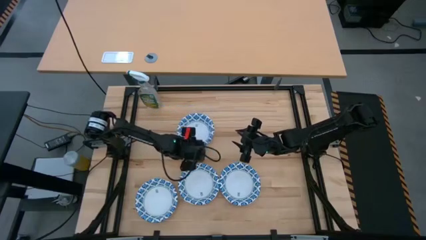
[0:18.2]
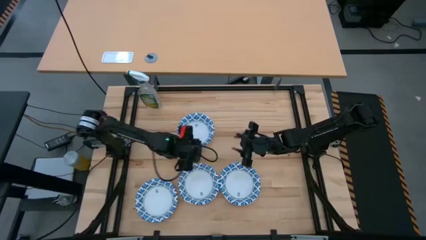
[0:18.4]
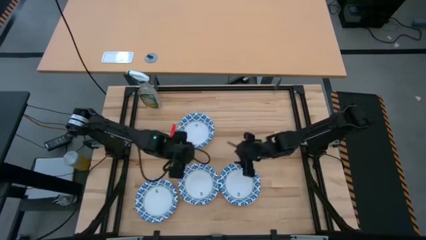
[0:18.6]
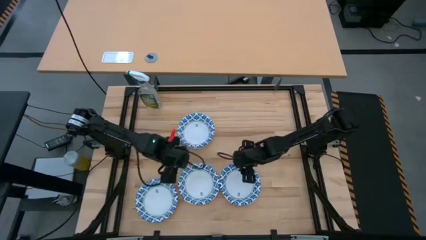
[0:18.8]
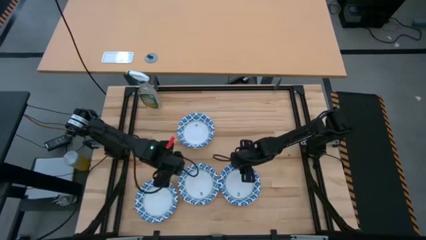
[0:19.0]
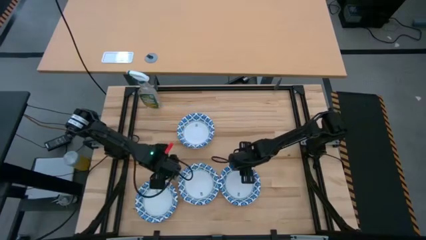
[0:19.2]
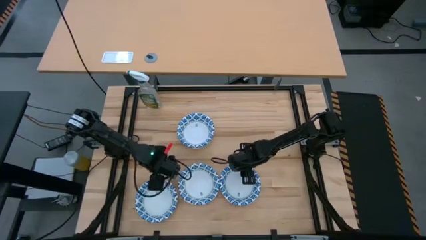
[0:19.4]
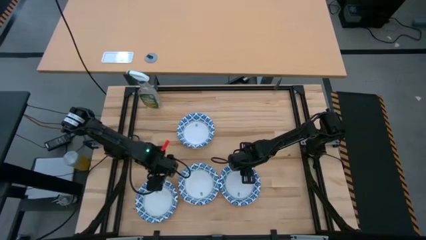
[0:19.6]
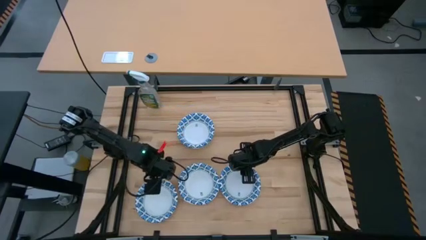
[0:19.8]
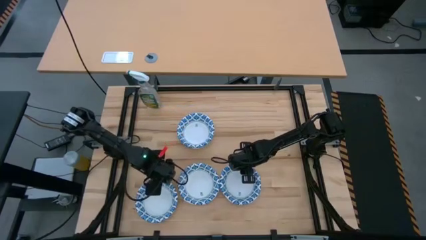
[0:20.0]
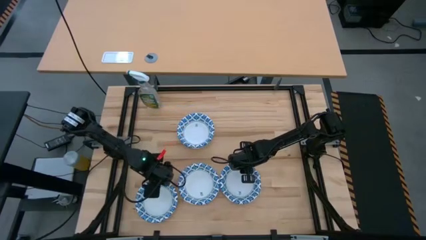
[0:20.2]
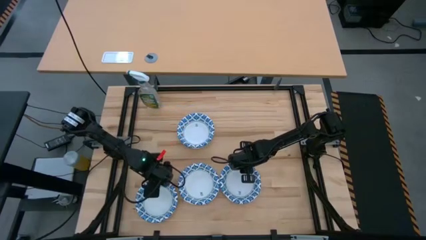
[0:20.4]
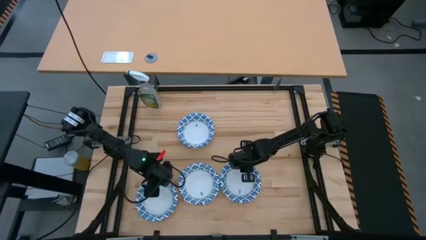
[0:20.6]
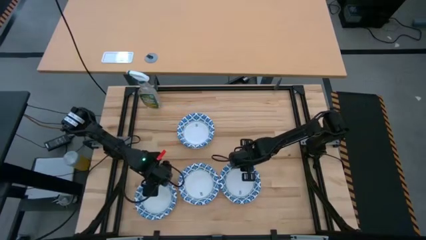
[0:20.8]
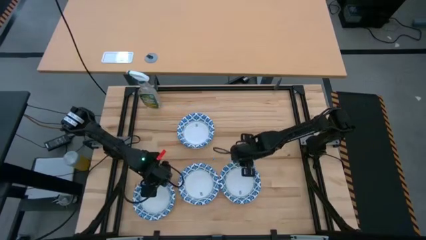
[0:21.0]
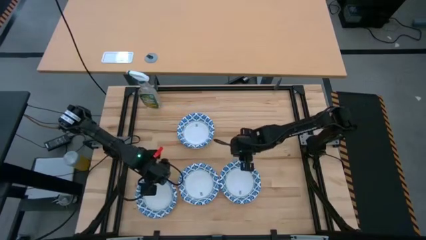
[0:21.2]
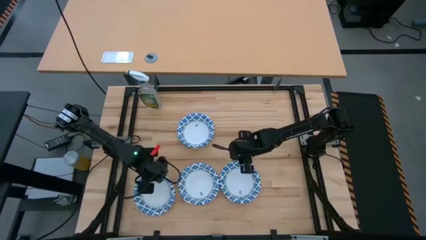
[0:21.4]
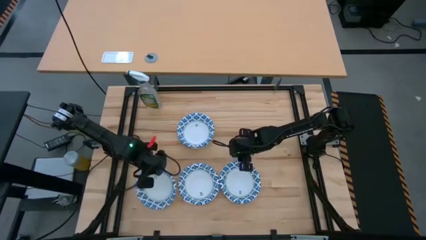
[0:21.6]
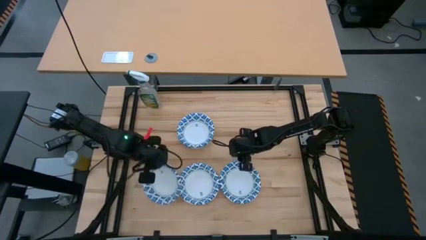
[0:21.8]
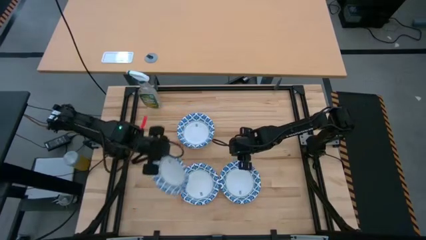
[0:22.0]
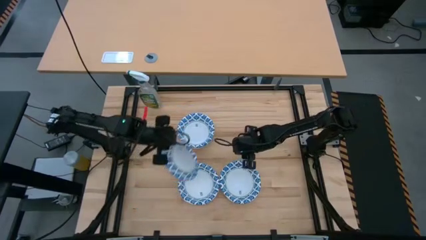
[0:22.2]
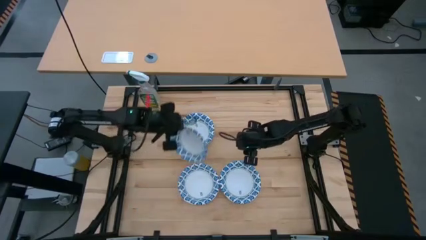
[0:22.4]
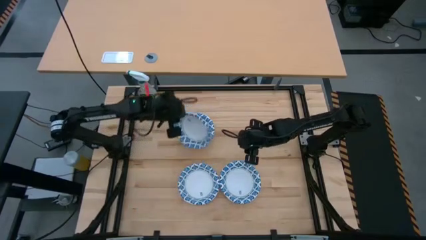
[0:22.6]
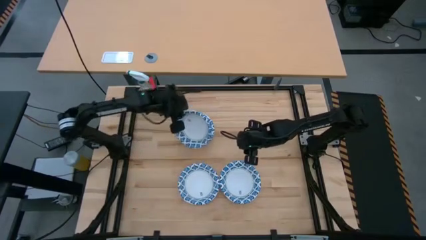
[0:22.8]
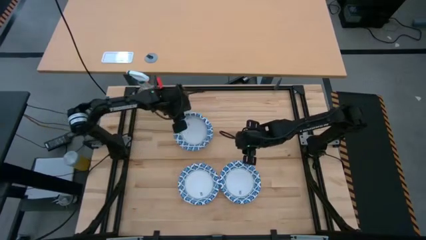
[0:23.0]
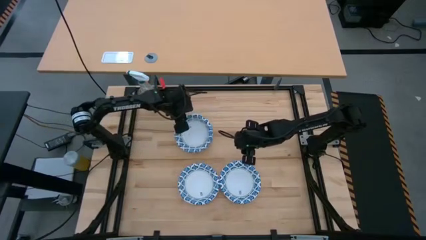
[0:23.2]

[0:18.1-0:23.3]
Stack the white bowl on top of the stacked white bowls

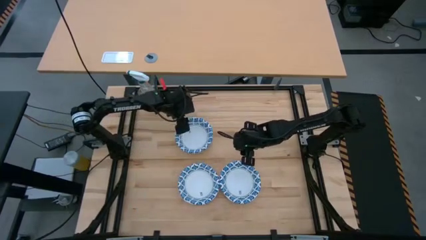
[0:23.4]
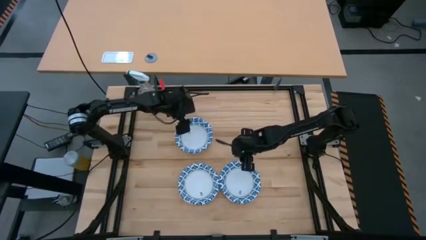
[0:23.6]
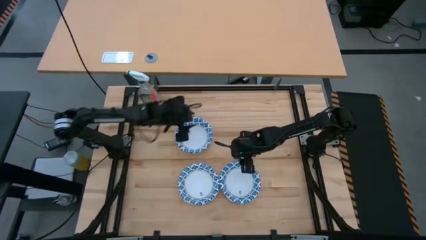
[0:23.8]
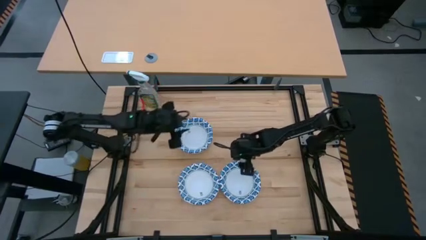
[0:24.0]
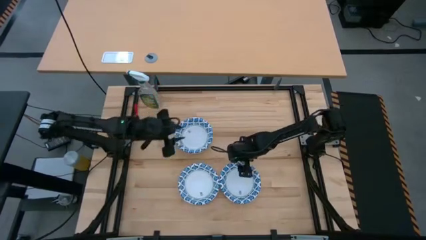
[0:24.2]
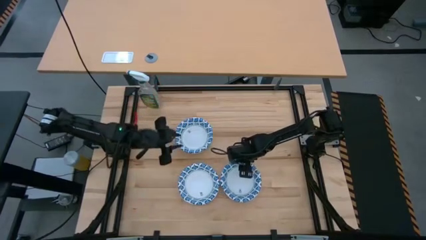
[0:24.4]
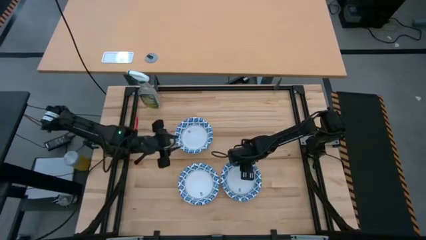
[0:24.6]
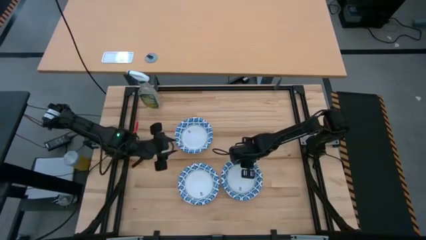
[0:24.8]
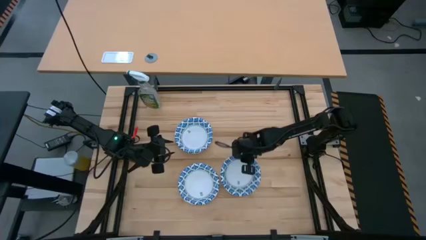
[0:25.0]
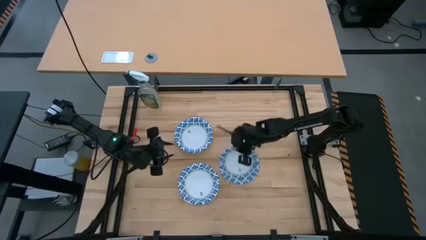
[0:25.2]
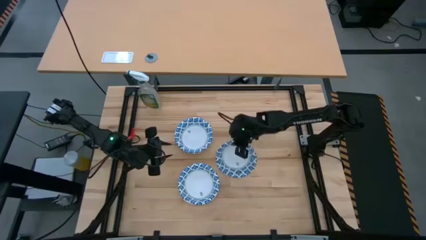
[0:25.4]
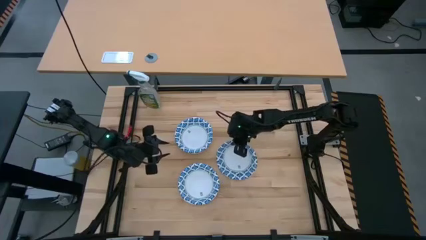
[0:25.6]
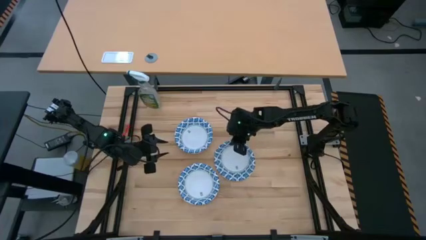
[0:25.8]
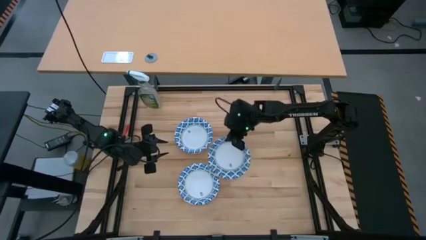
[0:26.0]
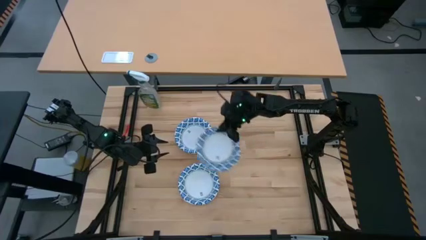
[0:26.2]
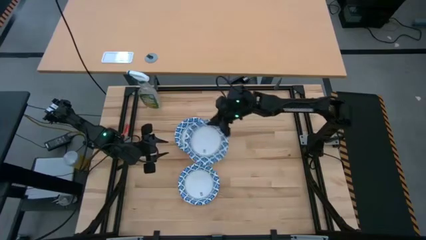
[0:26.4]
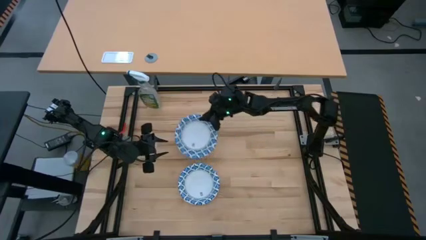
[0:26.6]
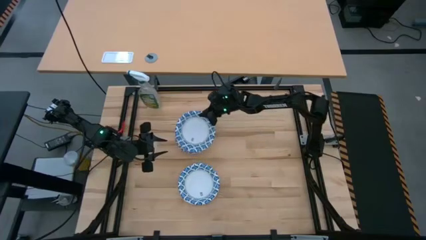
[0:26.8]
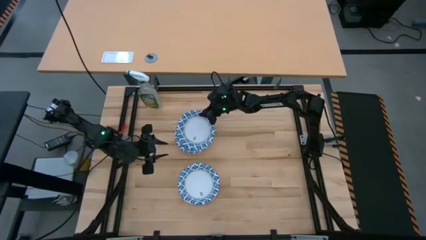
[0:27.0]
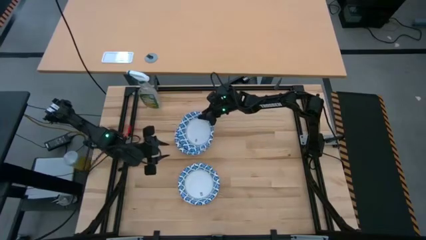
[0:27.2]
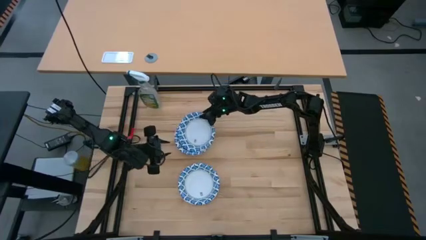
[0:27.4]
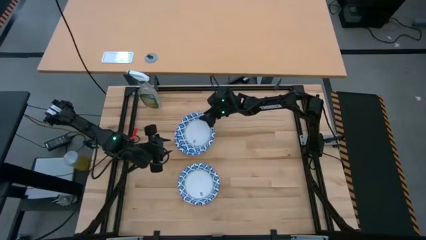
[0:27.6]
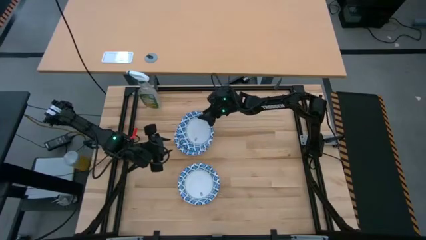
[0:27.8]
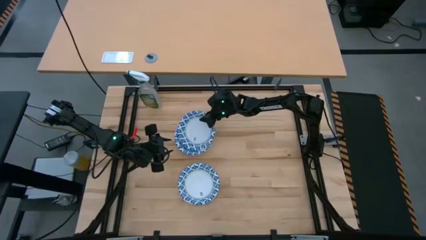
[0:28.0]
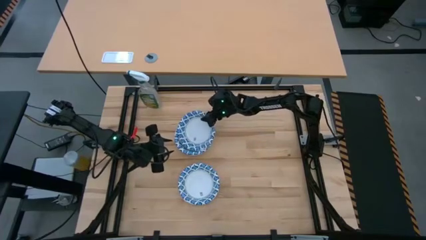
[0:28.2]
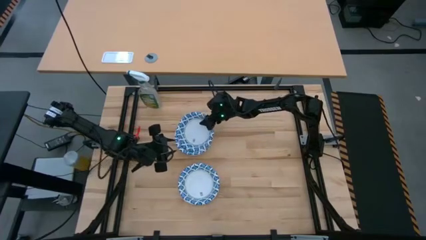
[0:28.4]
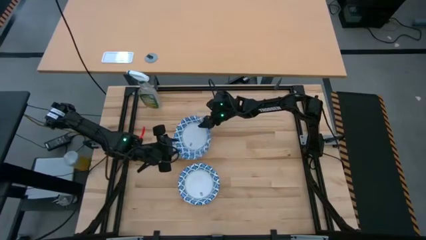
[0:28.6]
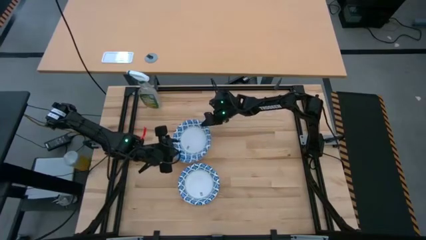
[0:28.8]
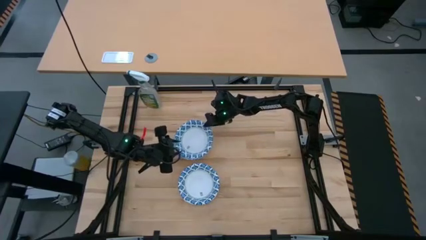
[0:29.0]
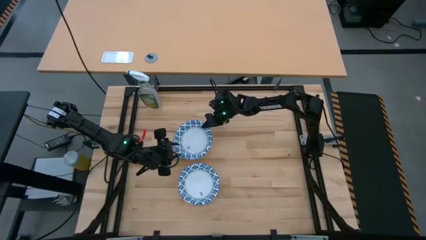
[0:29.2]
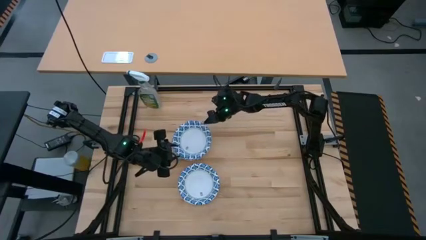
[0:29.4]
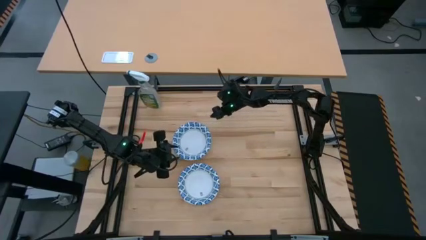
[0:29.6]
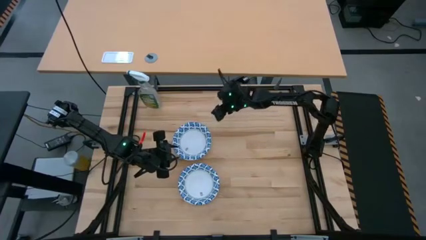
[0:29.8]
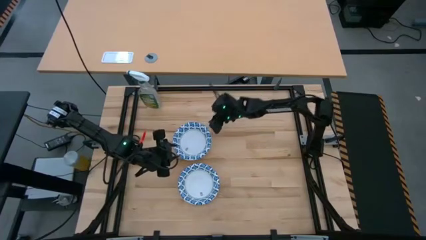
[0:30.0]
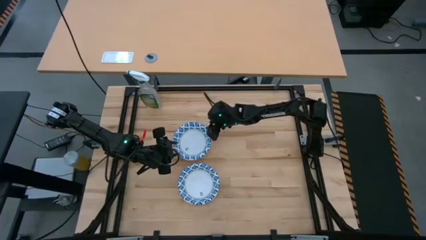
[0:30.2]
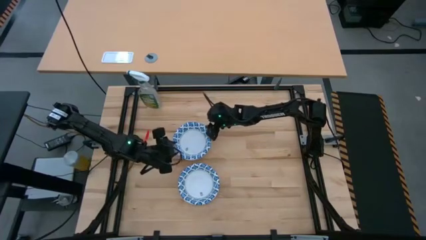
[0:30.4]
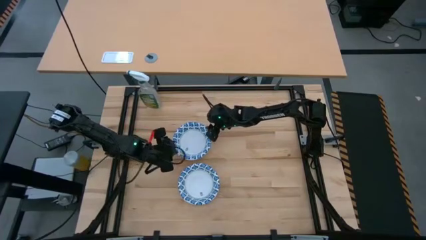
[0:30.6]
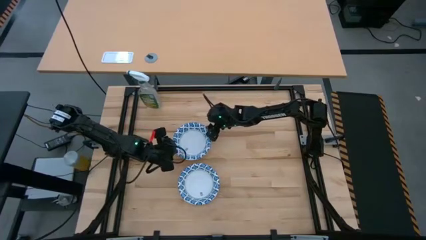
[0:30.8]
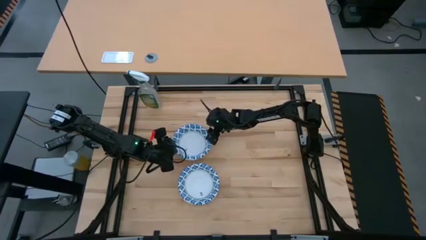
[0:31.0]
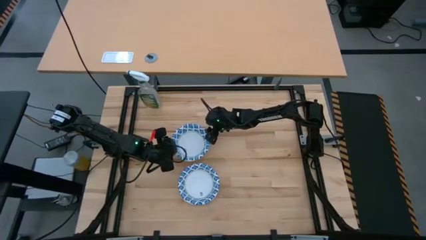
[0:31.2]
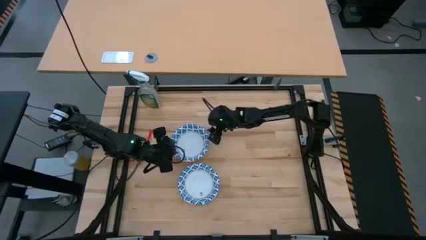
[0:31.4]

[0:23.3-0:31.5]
Stack the white bowl on top of the stacked white bowls

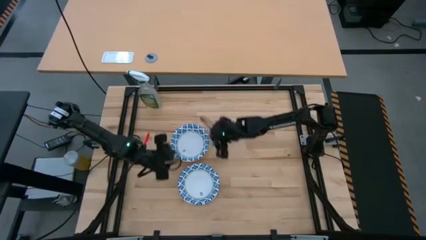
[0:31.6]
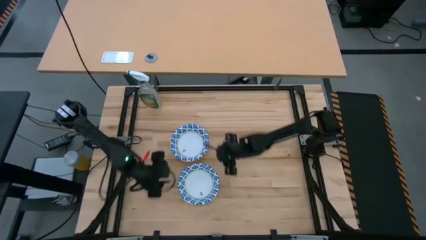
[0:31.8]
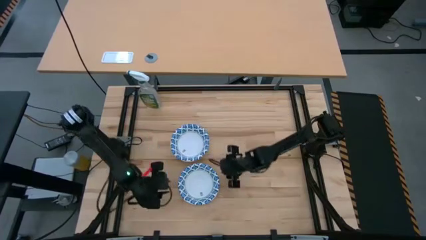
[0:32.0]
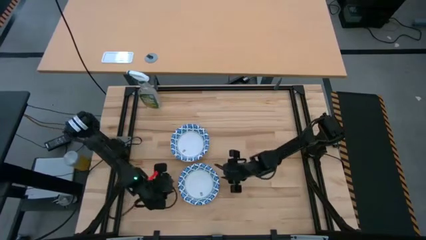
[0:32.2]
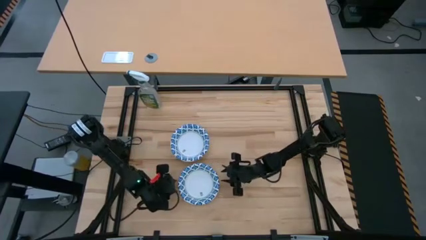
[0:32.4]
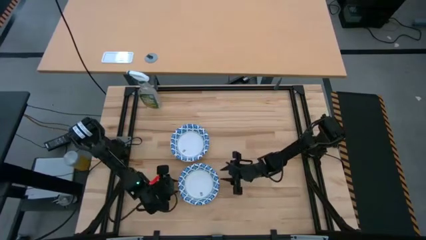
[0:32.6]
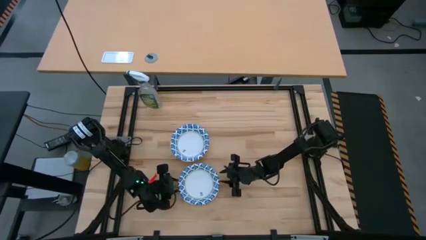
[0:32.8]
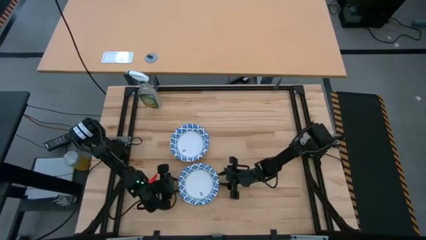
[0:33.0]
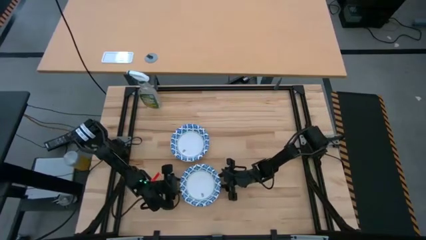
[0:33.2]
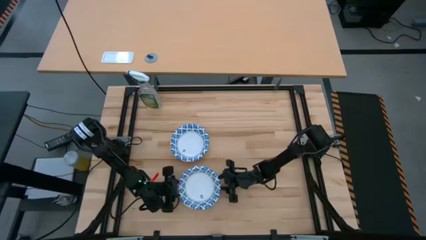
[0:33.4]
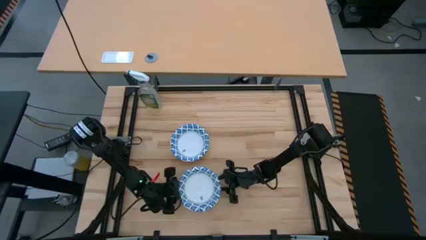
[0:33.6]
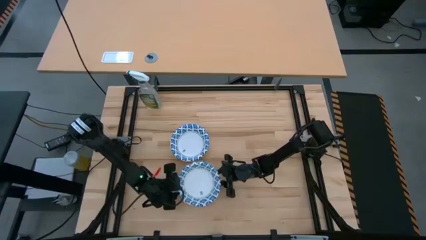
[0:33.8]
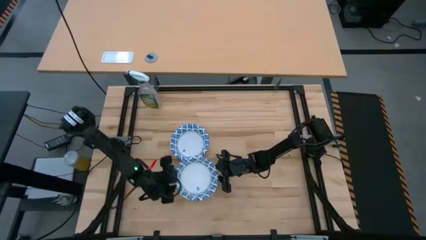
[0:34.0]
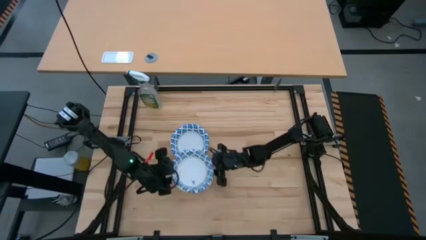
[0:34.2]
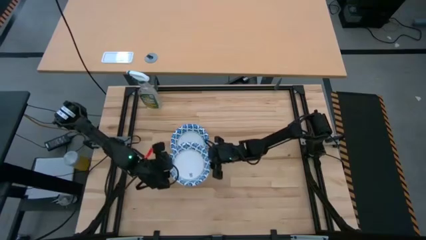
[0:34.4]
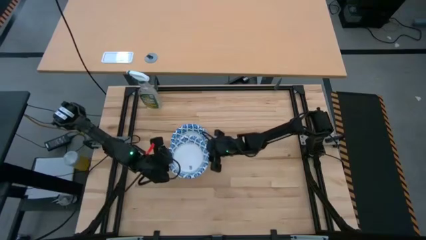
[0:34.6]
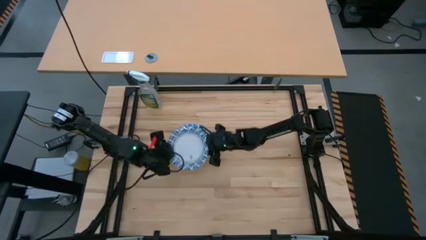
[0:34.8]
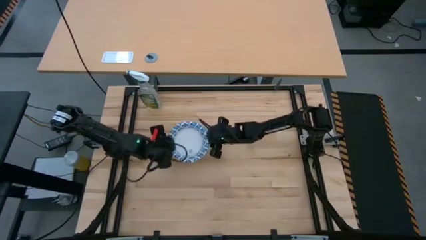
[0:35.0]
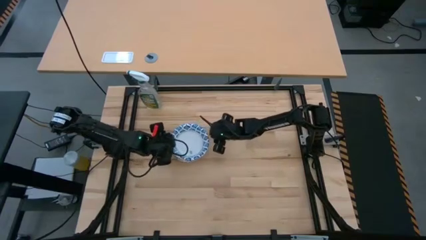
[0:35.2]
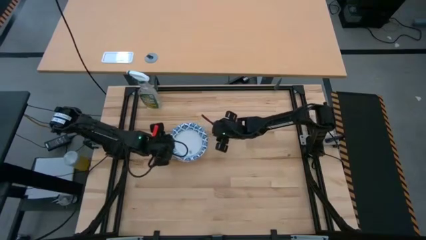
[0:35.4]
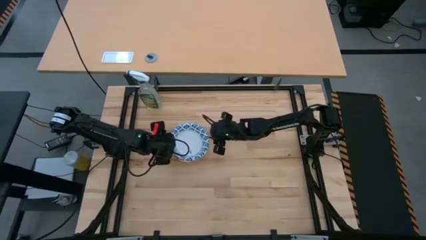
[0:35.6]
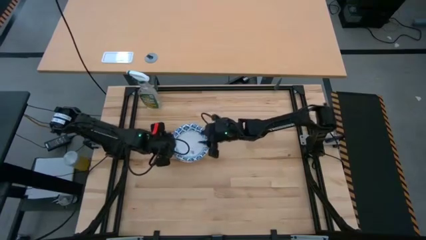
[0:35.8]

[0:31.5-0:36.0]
Stack the white bowl on top of the stacked white bowls
